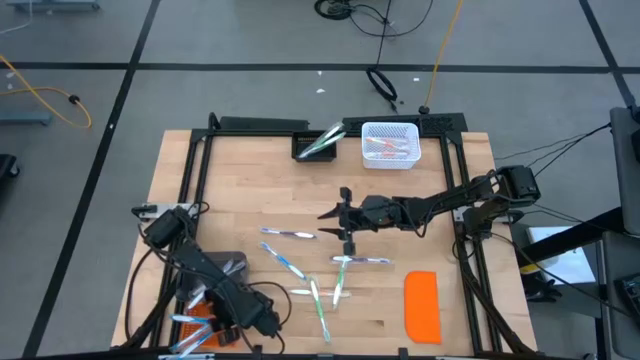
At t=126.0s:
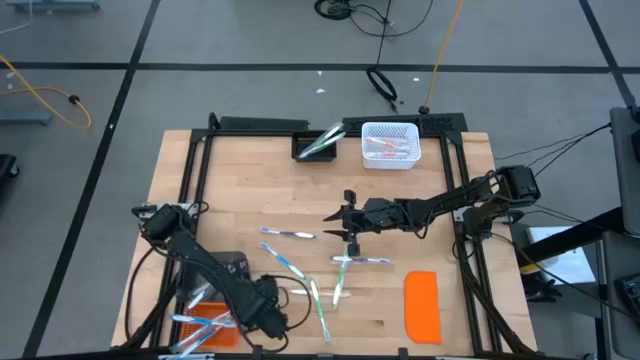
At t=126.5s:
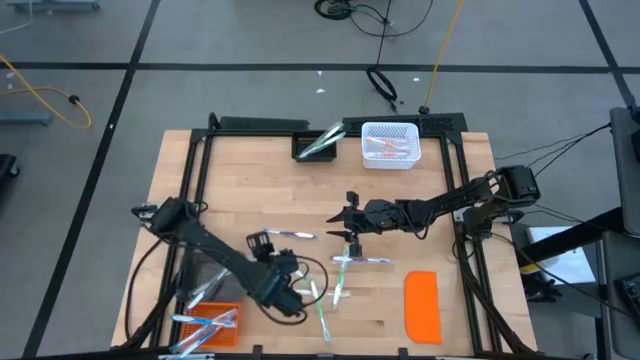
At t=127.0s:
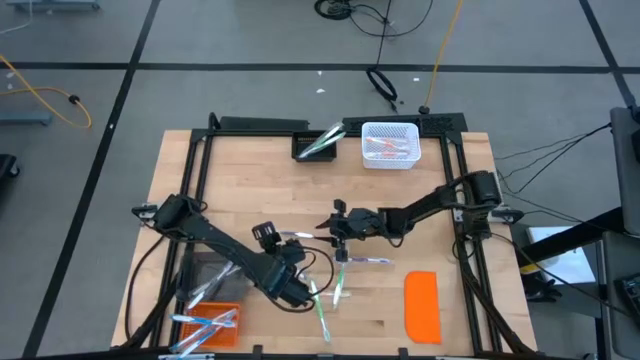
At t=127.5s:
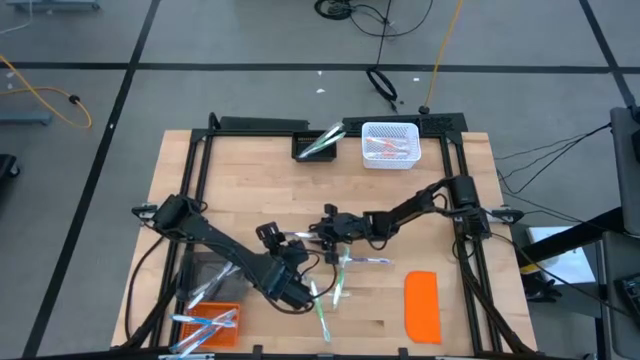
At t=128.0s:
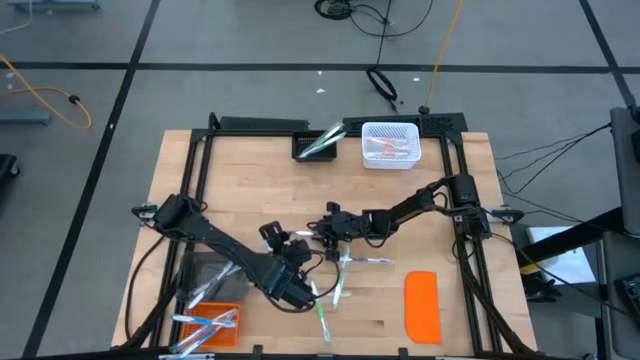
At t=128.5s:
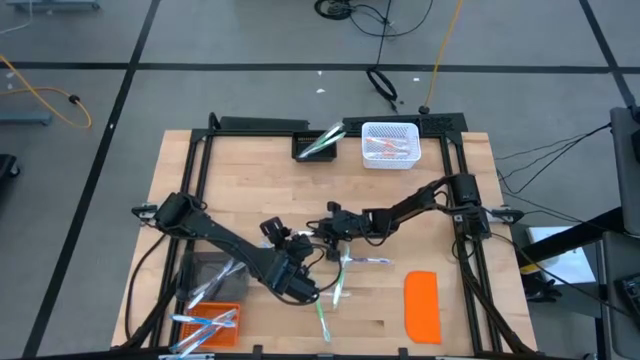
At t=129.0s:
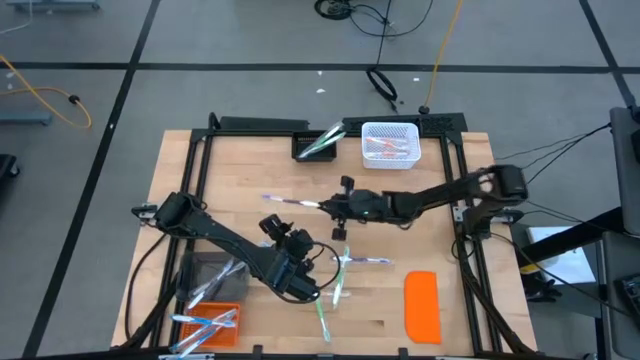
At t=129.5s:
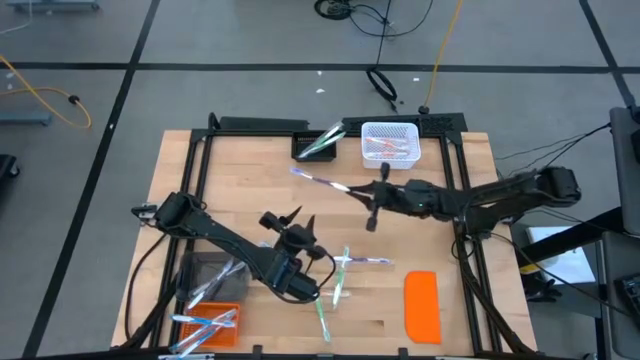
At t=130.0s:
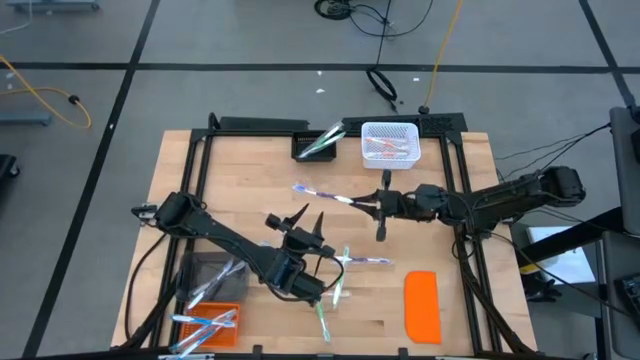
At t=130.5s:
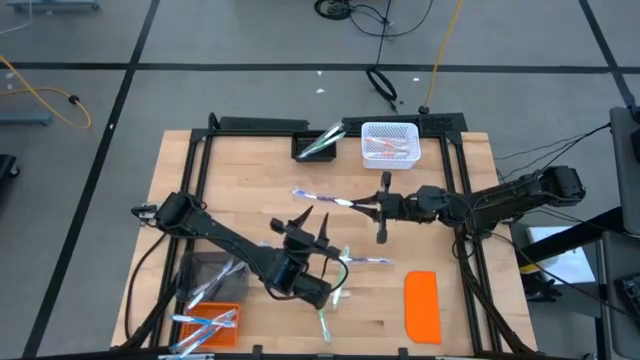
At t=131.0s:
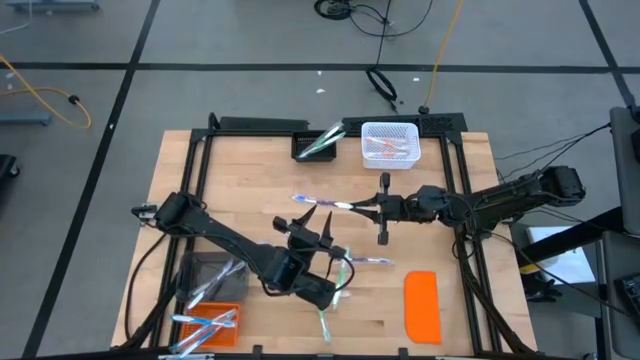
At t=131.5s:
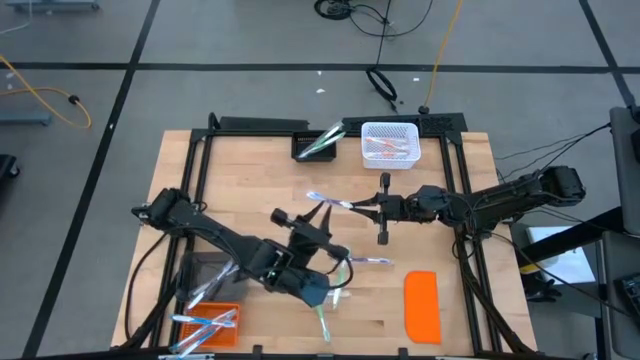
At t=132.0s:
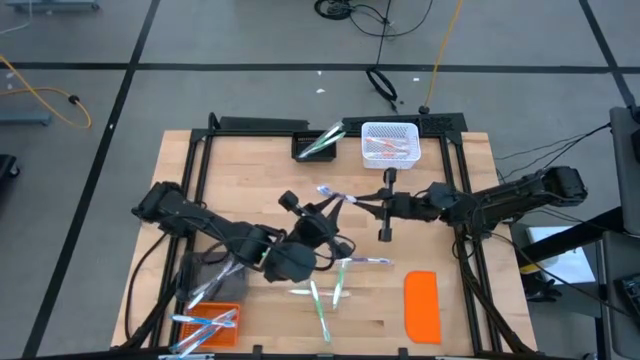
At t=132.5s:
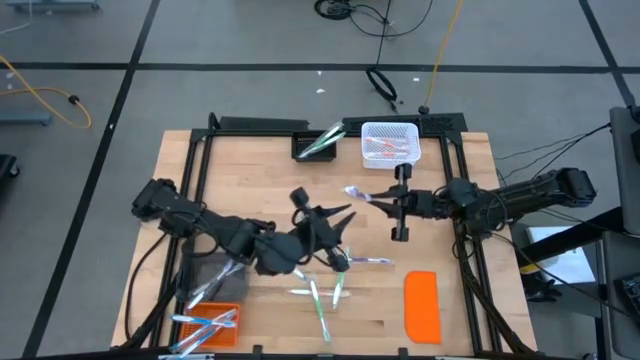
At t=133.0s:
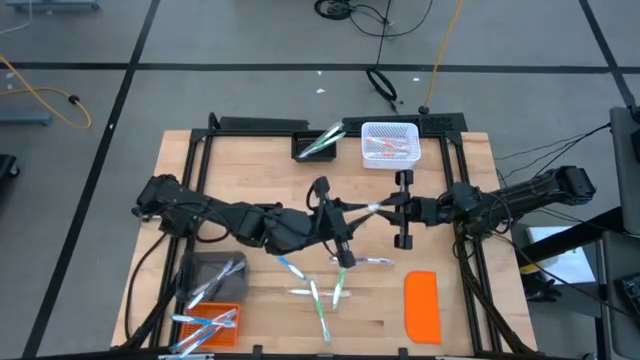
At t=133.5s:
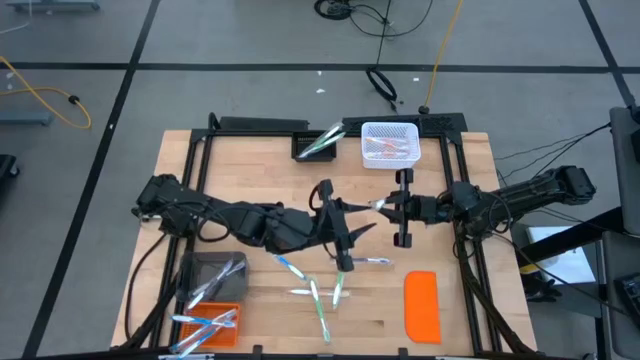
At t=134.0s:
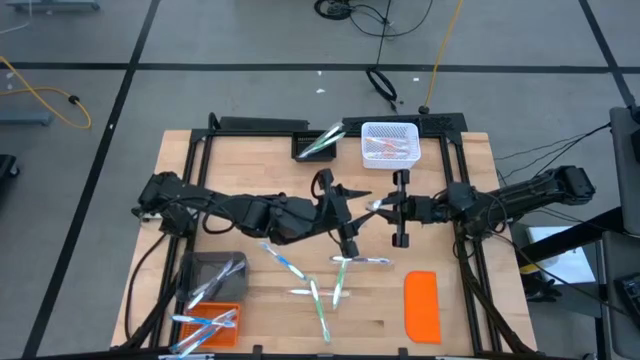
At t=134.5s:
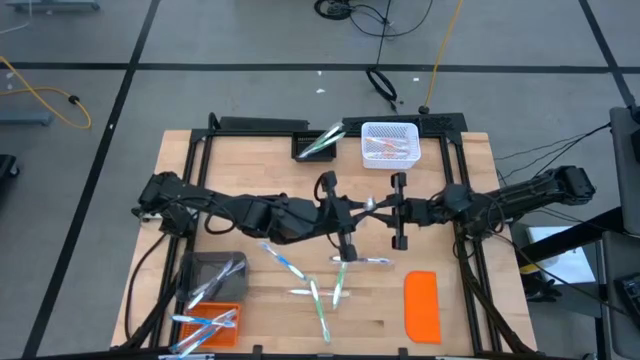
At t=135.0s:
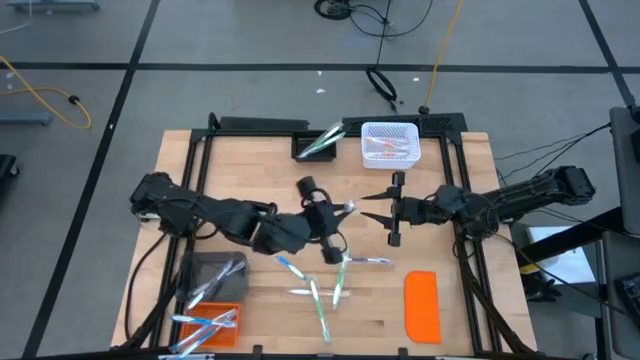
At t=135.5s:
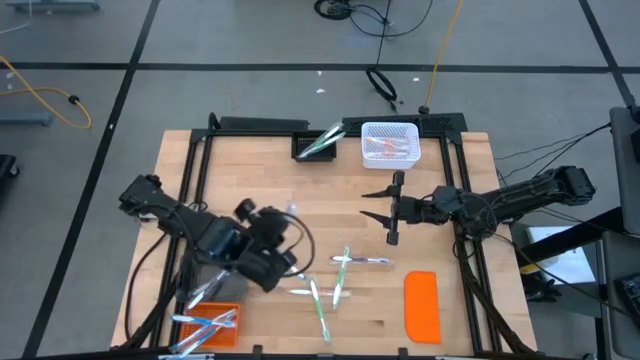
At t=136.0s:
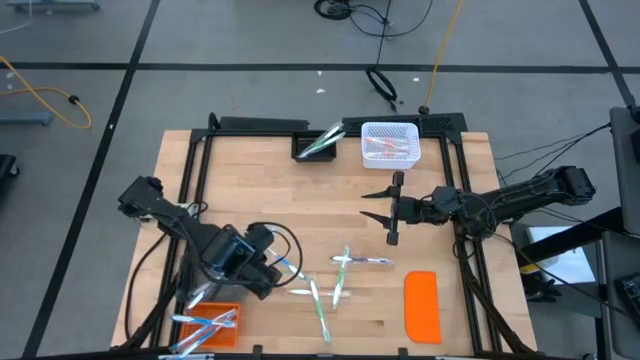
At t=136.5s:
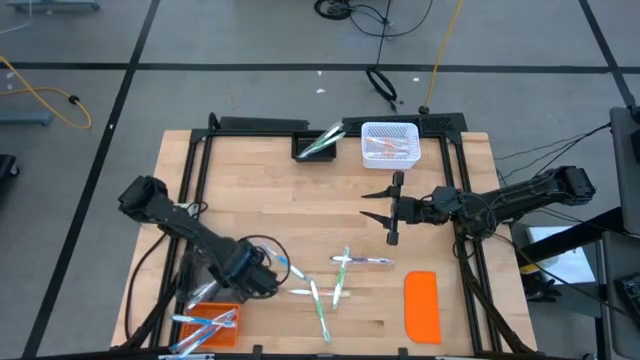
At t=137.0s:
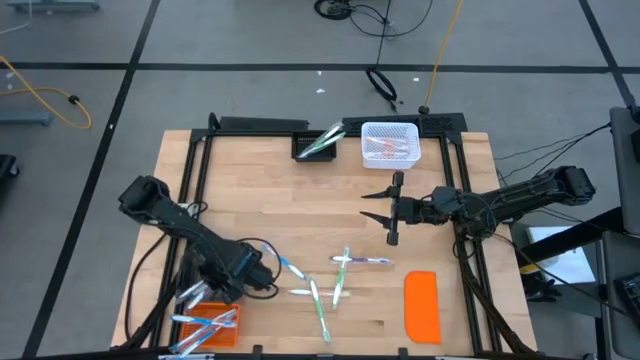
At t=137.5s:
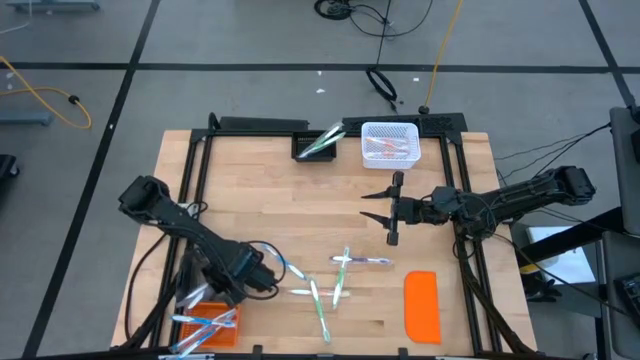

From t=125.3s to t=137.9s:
Task: Pick & Place Toothbrushes
Put the violet toothbrush into the transparent bin

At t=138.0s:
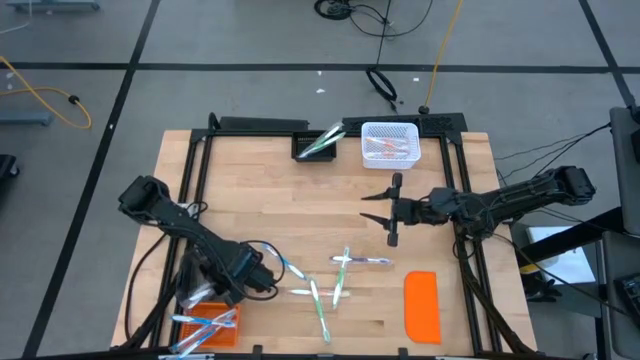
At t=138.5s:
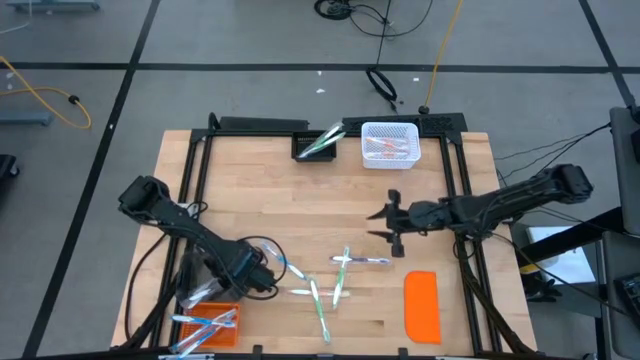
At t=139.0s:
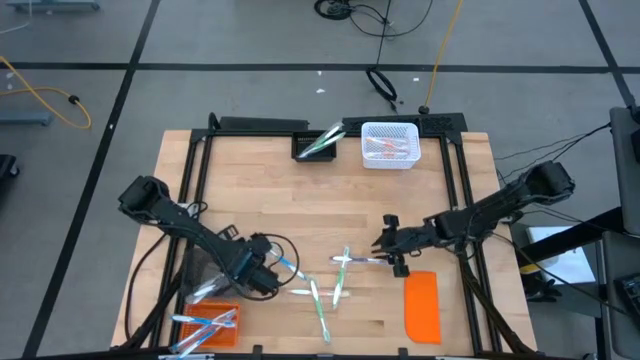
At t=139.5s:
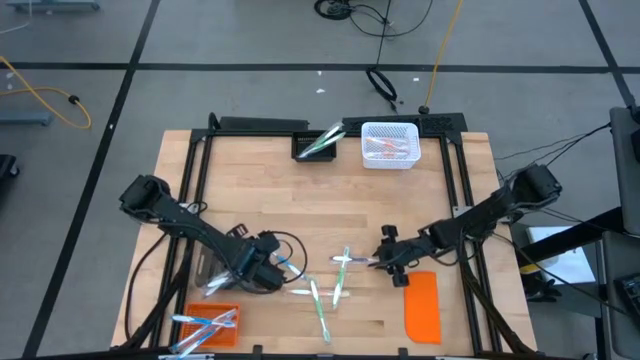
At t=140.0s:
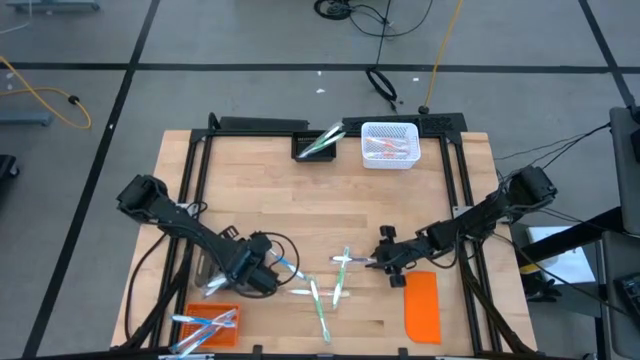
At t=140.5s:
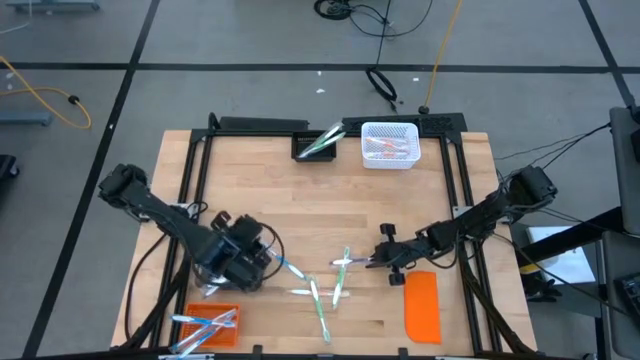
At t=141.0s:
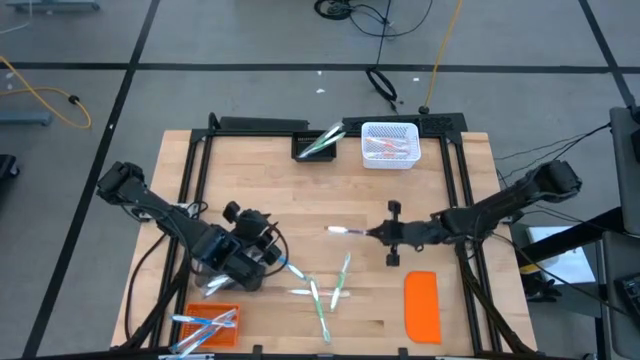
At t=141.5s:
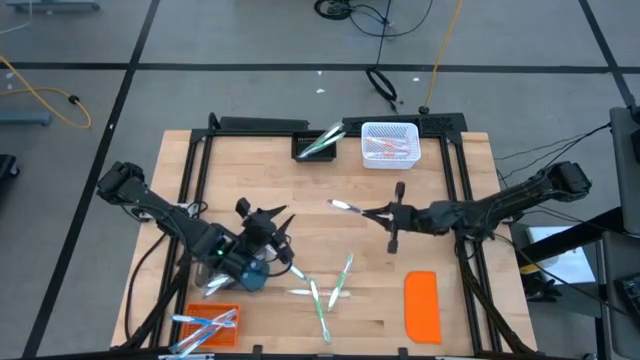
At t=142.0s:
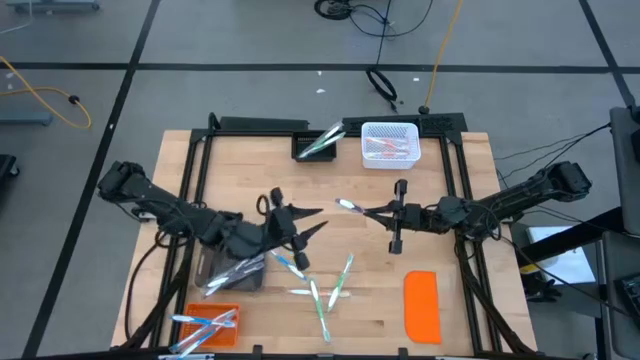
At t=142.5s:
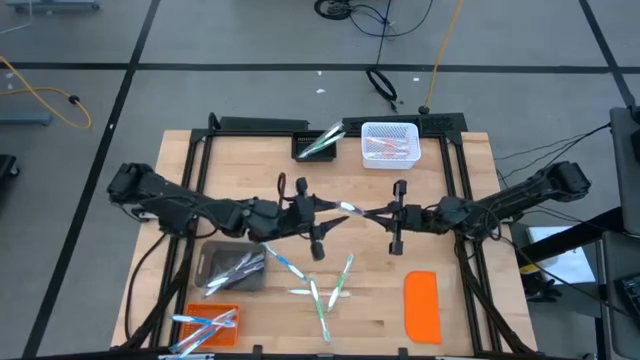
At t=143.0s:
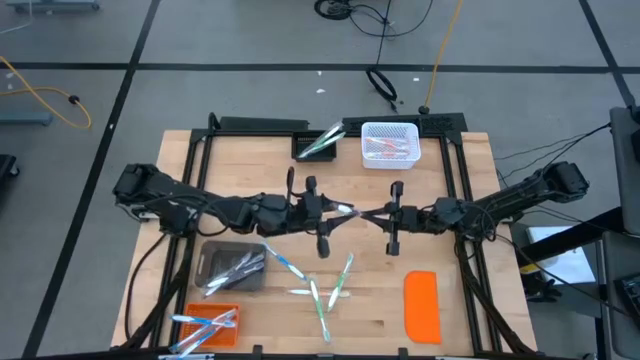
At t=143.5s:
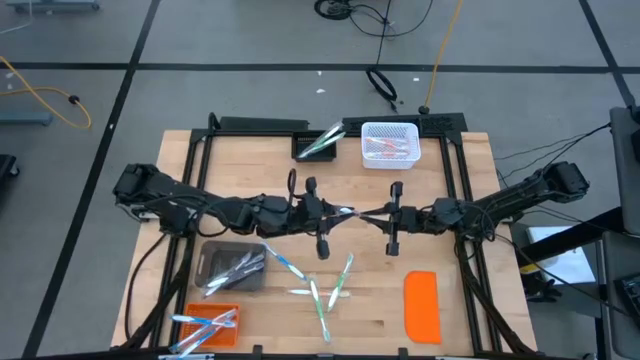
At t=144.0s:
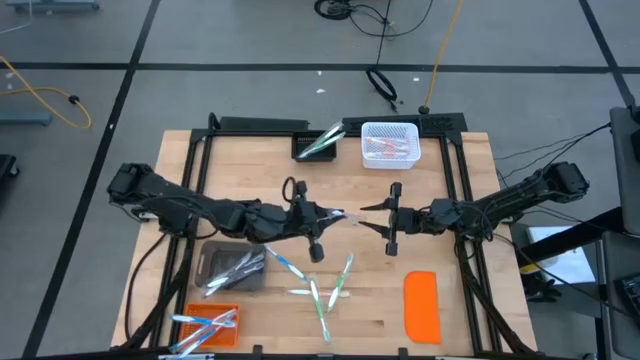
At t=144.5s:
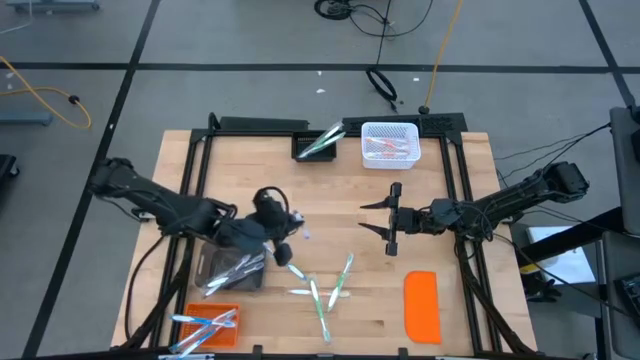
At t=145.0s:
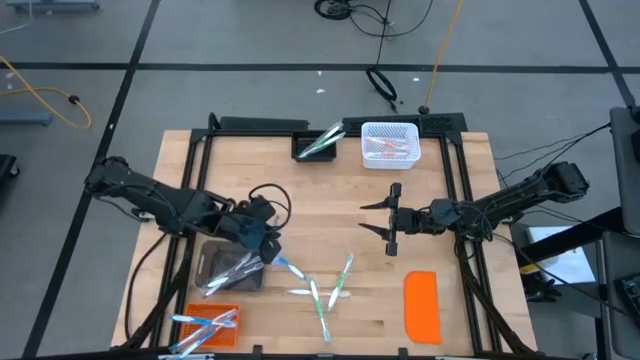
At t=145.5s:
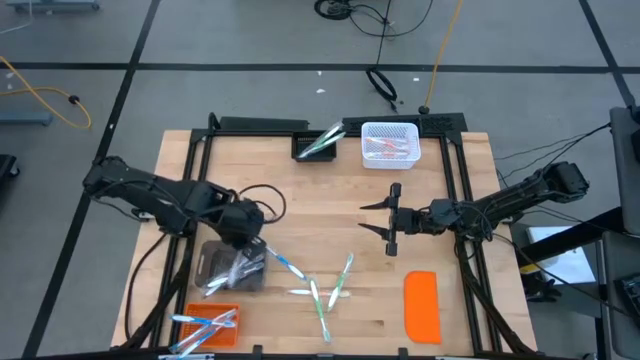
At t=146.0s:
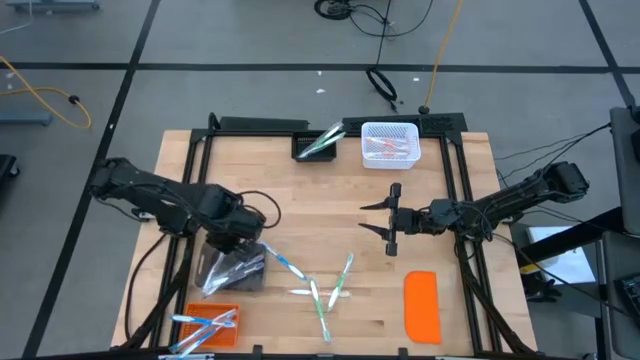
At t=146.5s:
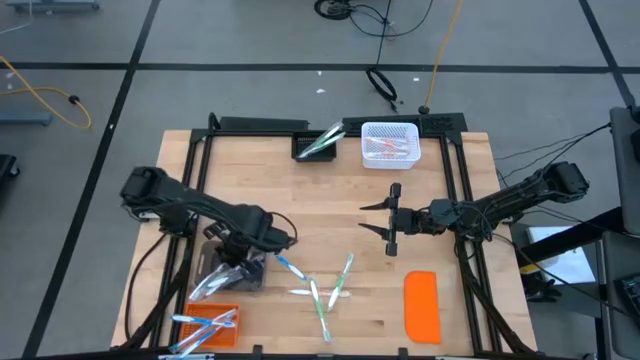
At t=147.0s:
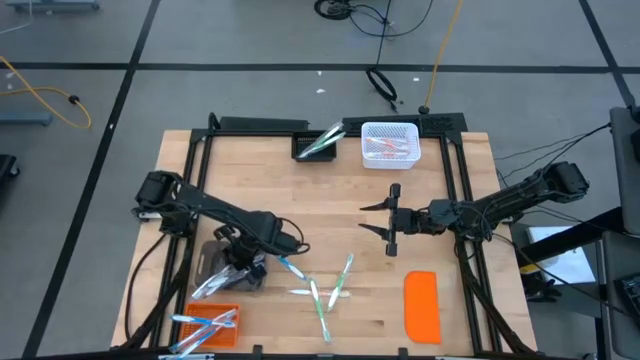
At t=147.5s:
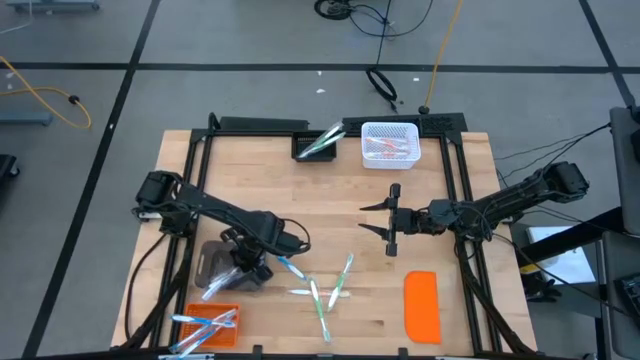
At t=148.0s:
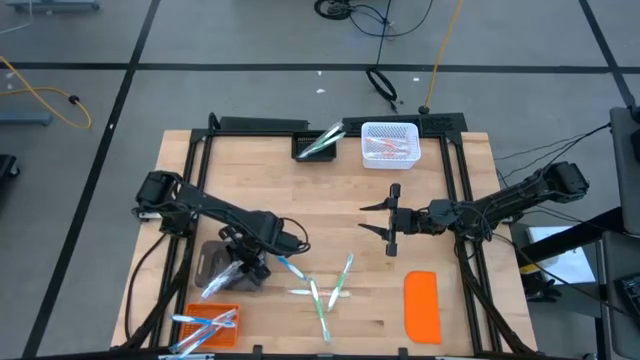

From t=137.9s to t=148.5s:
Put the violet toothbrush into the transparent bin
